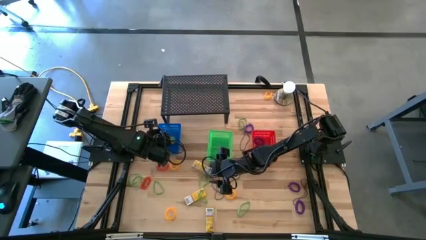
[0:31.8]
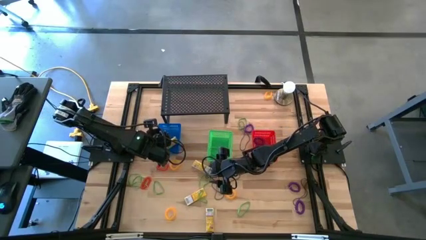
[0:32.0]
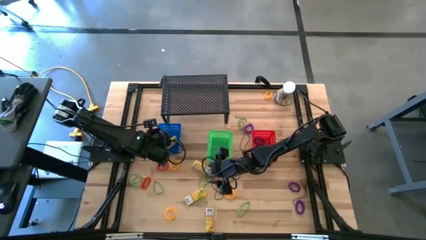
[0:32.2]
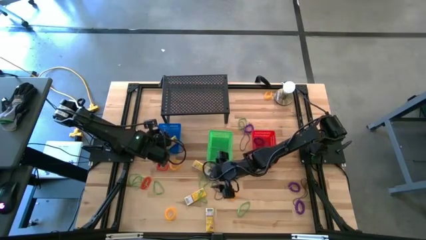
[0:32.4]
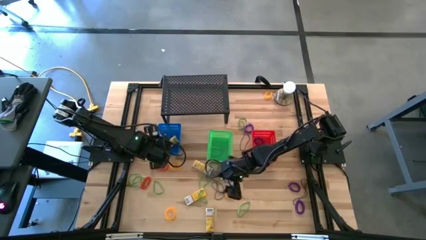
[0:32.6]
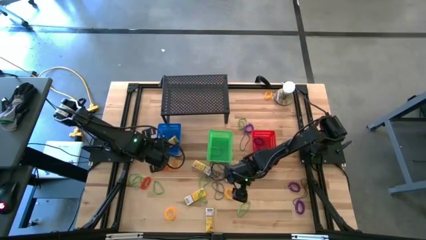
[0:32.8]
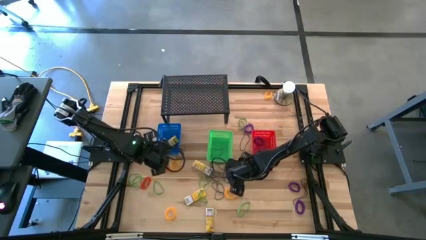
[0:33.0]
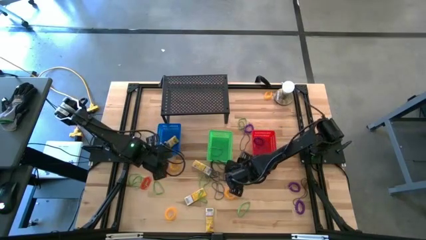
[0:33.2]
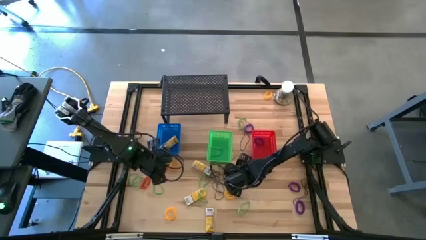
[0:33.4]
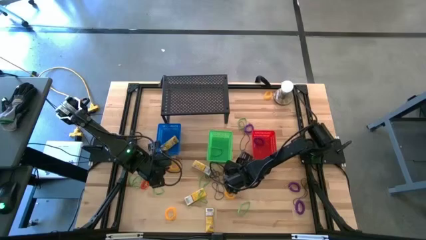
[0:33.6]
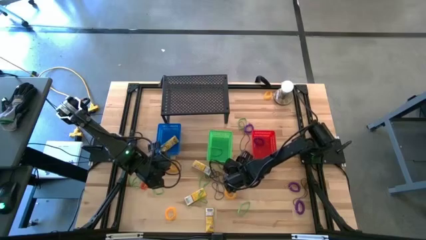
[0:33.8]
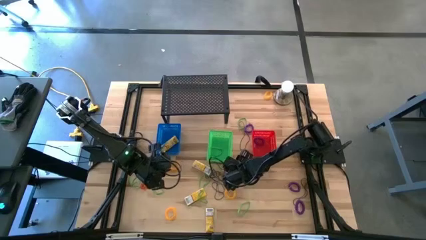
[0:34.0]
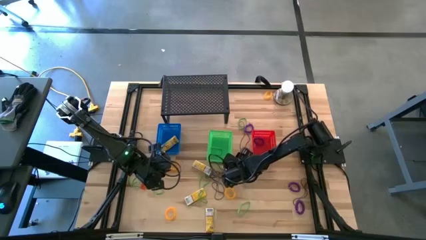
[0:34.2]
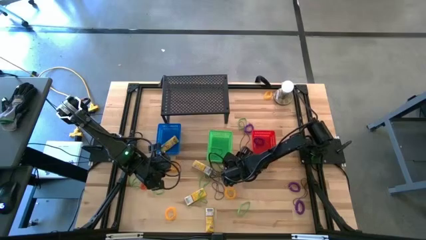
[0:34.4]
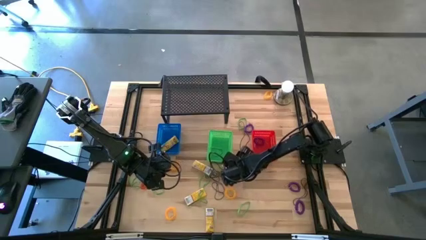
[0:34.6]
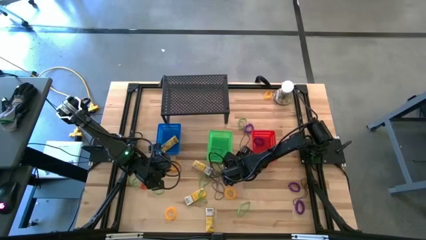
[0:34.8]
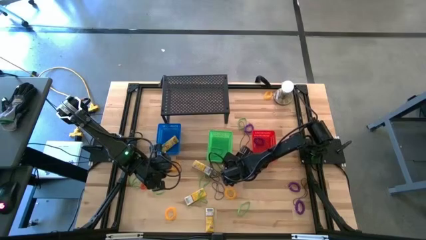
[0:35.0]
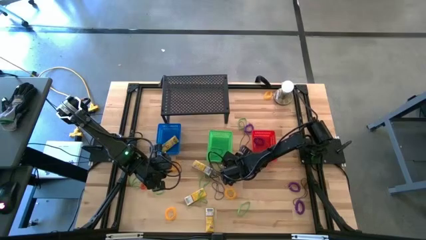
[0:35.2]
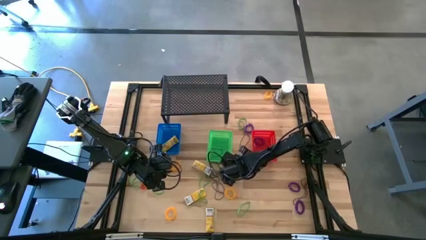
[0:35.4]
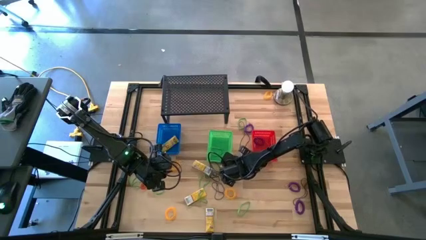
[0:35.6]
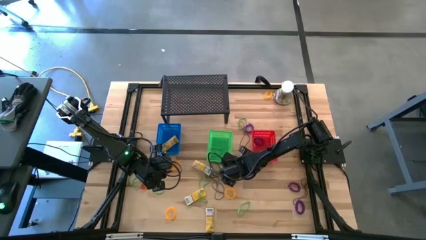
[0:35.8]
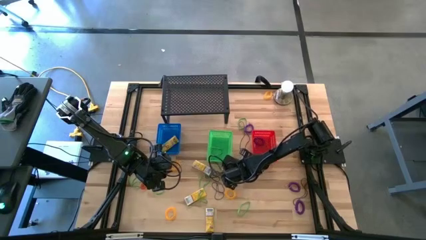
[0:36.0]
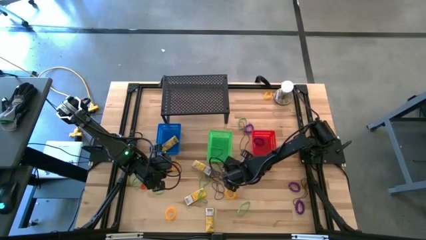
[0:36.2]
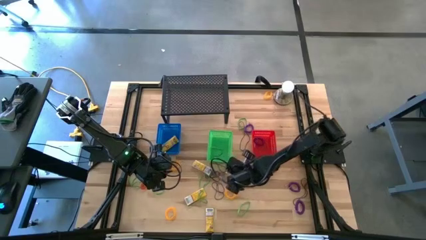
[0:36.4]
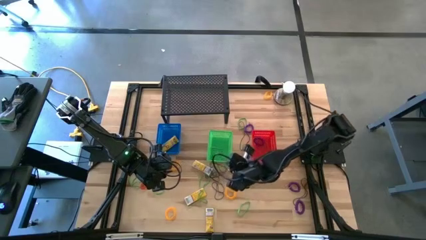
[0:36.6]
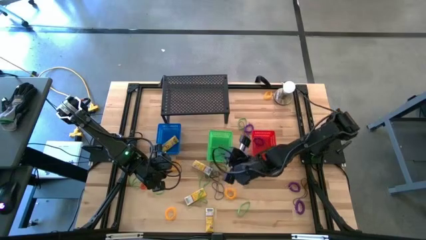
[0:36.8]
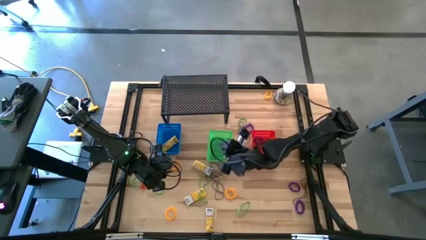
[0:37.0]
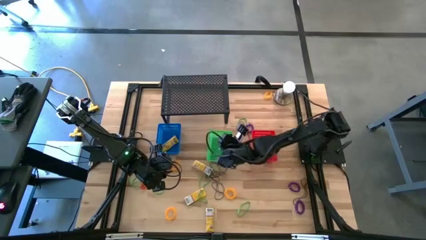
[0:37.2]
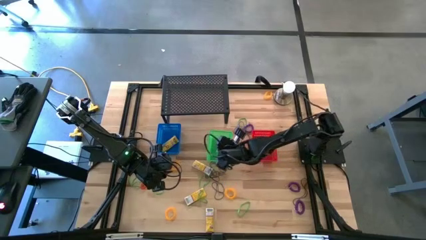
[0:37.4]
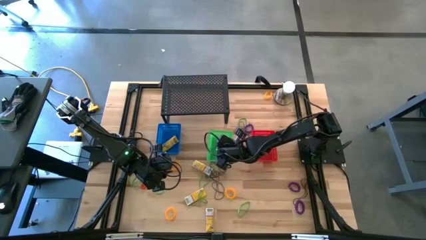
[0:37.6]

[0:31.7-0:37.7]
Task: Pick & Place Office Desk Supplies
Put the black rubber band into the green bin

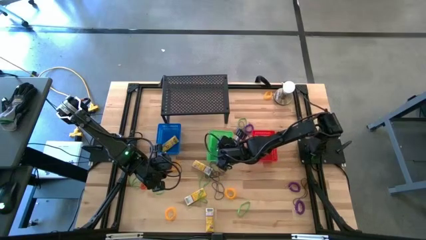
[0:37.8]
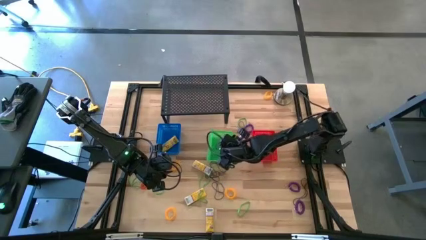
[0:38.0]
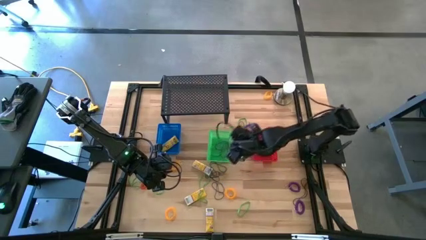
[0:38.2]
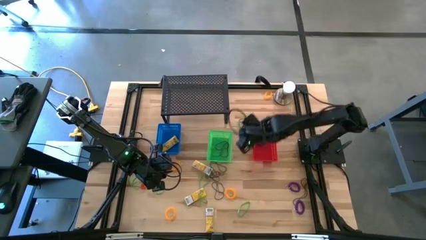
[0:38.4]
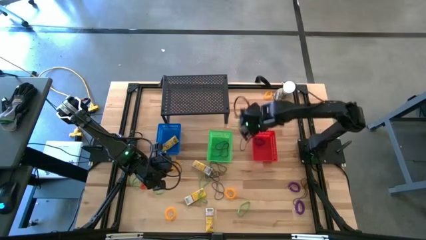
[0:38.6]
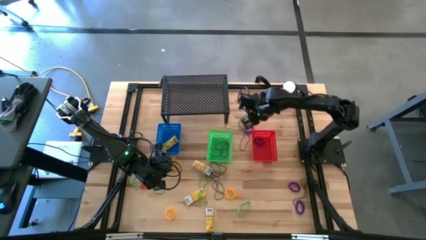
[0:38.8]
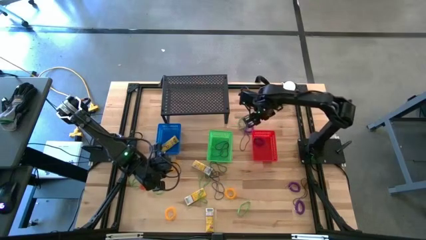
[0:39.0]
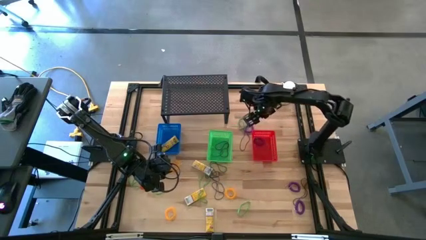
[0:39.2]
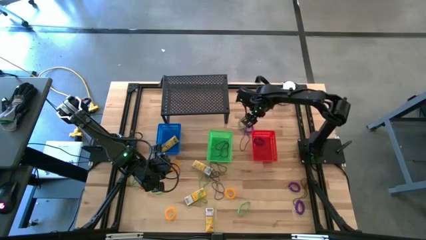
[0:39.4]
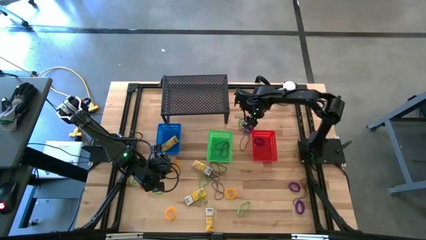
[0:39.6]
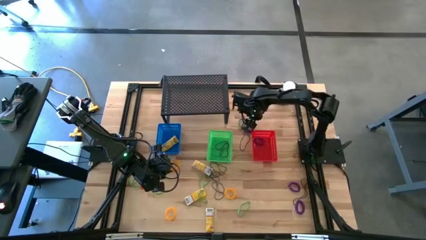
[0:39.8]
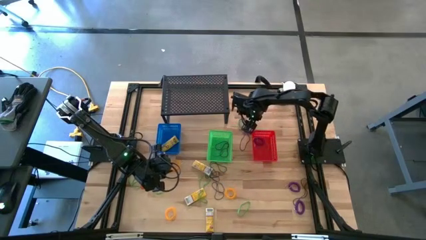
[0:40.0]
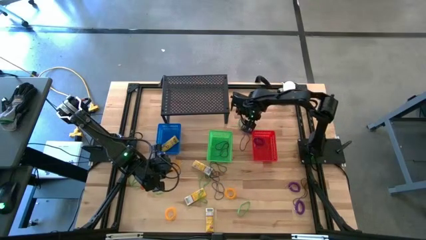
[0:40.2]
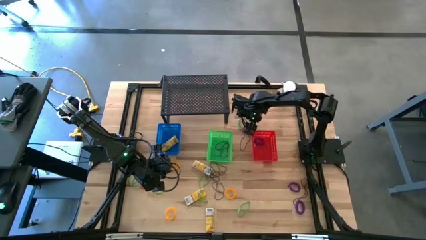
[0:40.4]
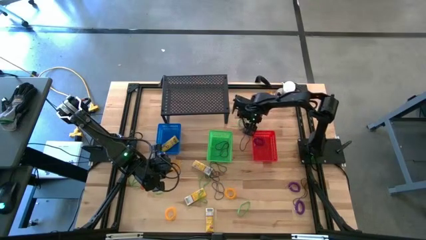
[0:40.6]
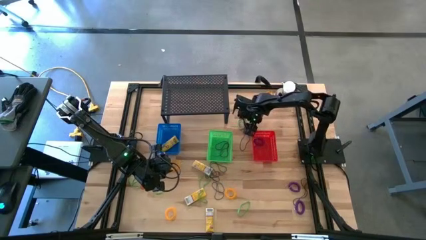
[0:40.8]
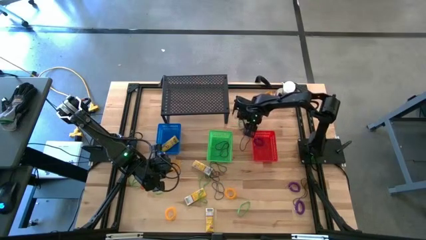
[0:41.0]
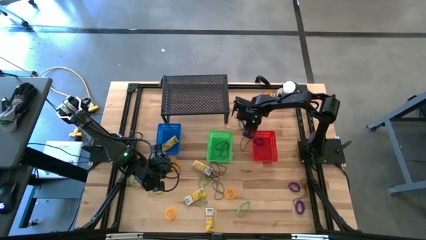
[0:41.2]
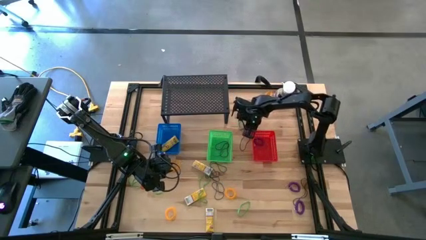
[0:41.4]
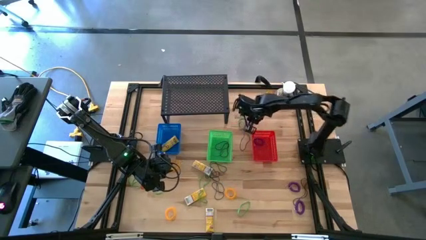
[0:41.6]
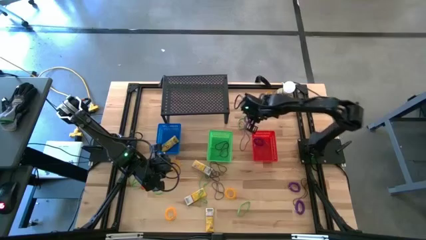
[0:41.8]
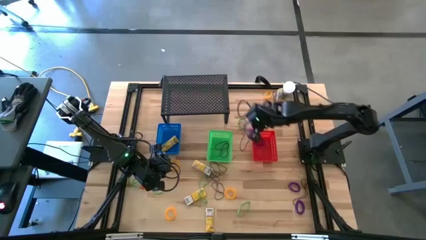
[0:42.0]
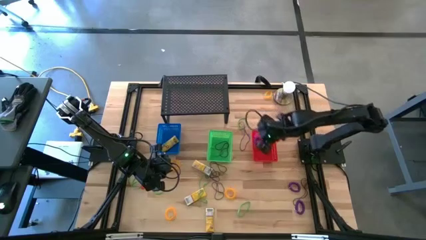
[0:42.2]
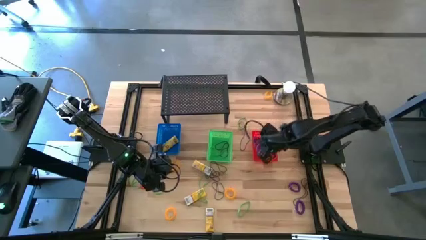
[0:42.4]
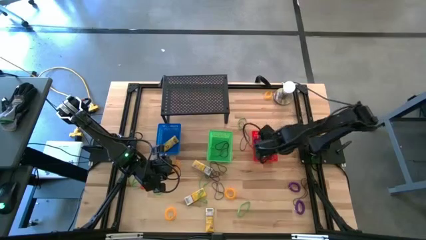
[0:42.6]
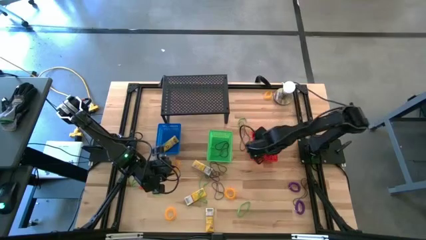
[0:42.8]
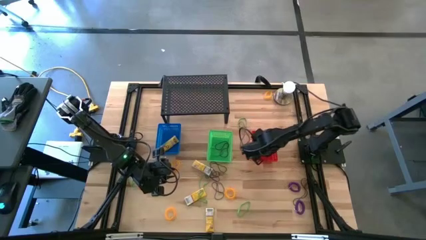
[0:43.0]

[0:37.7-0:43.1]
Put the violet spring keychain into the red bin

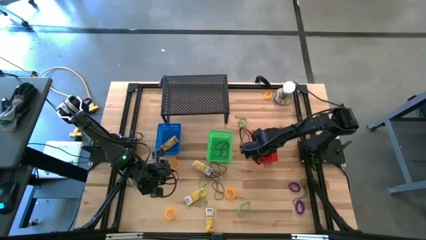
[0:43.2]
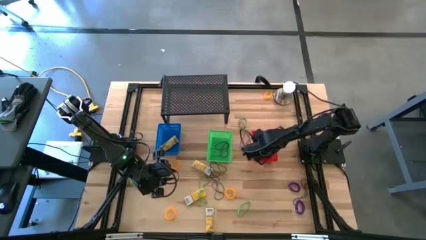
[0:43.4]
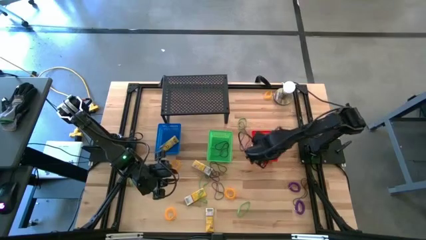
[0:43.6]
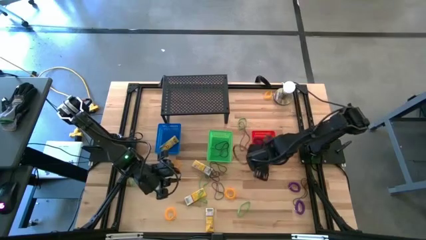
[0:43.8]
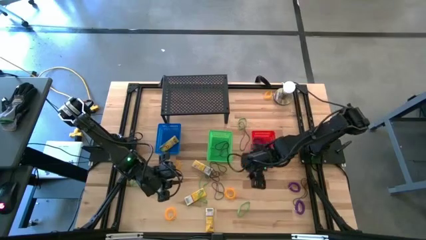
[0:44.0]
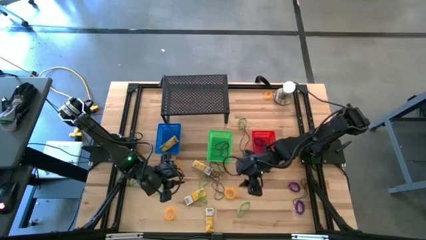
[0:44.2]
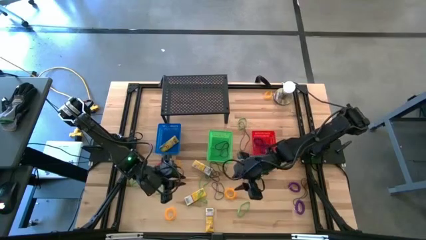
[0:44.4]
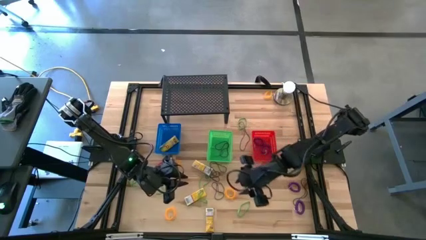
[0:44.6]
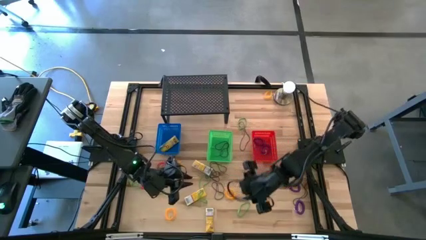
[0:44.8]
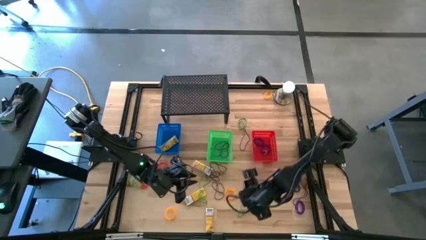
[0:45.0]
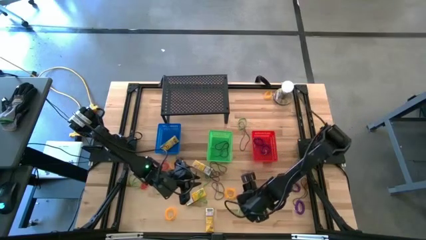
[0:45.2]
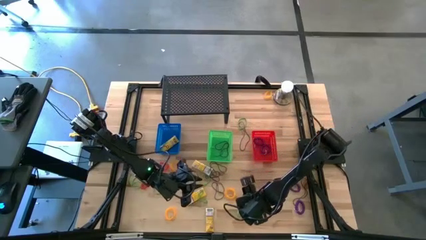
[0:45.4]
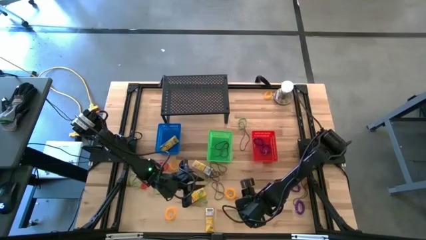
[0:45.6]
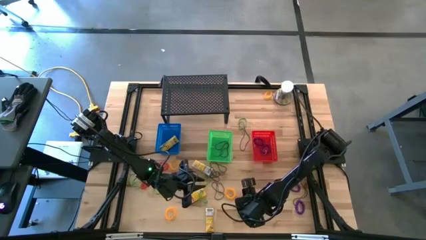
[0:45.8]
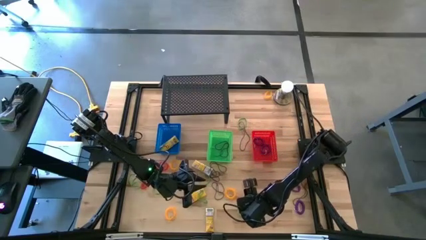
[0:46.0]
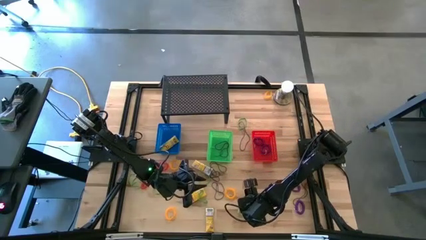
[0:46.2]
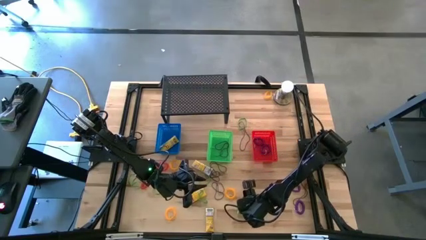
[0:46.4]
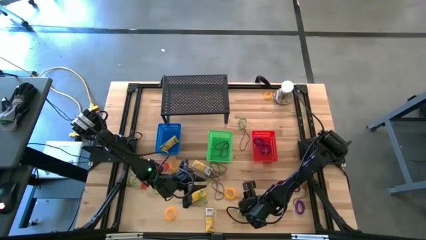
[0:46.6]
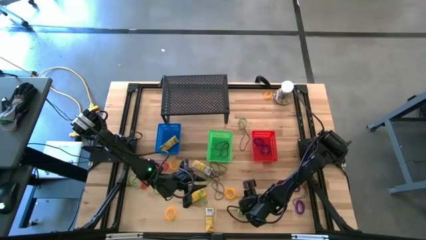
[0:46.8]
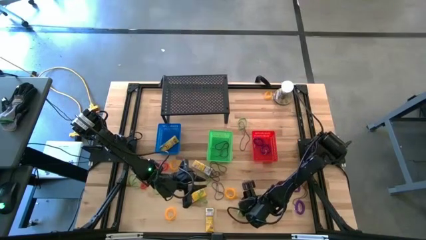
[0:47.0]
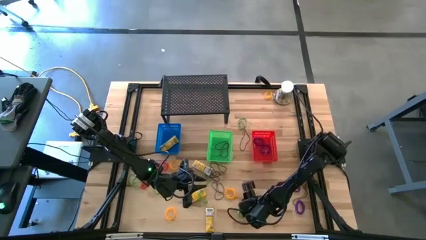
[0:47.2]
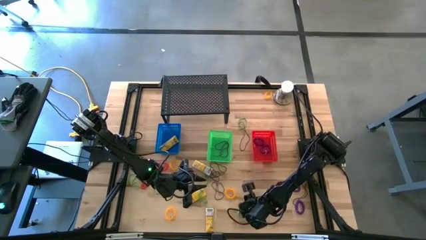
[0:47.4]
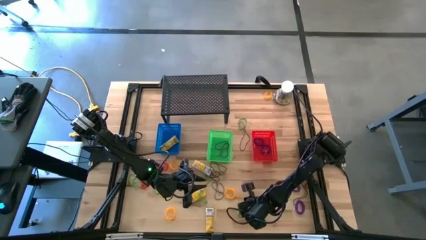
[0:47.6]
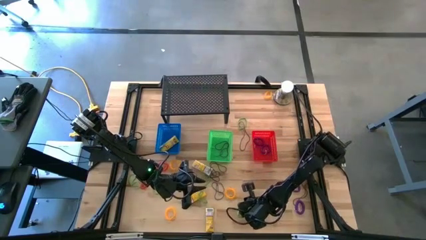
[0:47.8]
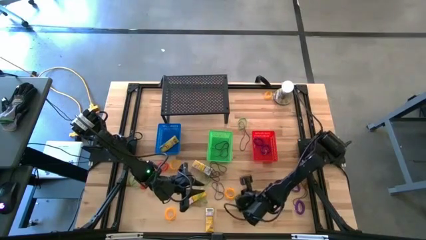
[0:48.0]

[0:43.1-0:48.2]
Put the green rubber band into the green bin

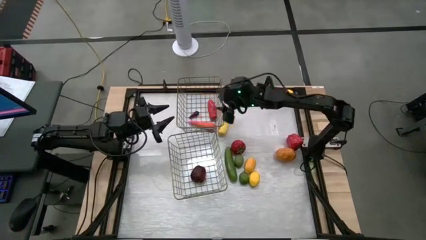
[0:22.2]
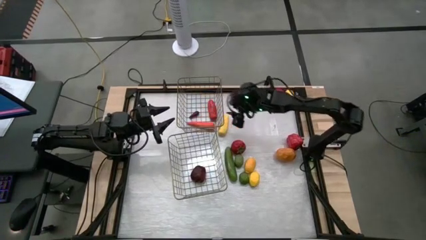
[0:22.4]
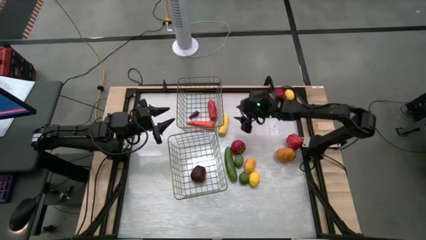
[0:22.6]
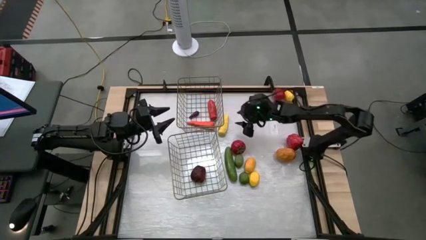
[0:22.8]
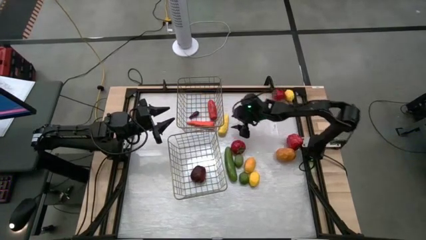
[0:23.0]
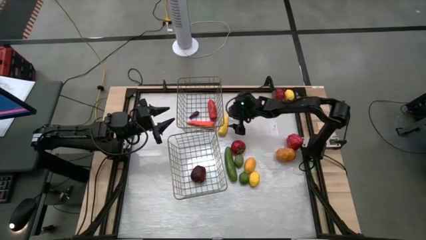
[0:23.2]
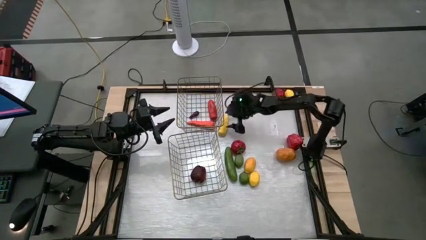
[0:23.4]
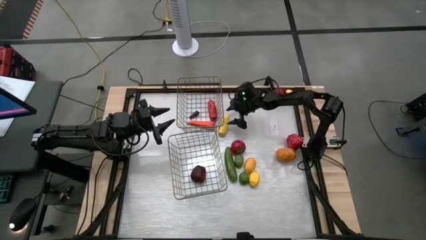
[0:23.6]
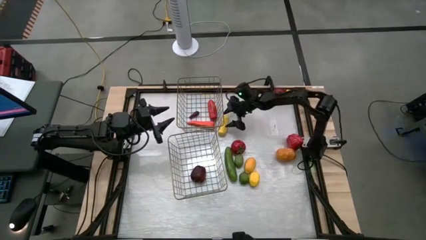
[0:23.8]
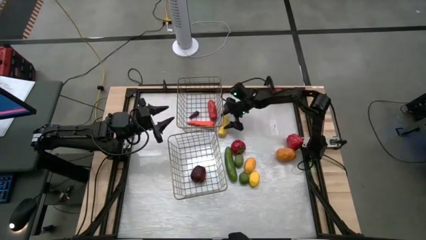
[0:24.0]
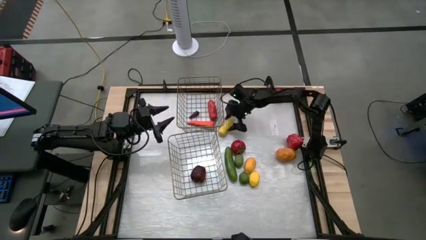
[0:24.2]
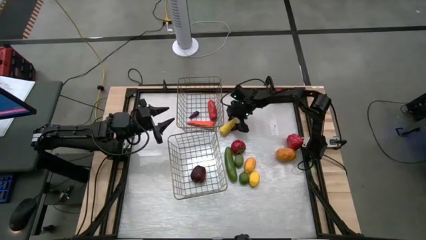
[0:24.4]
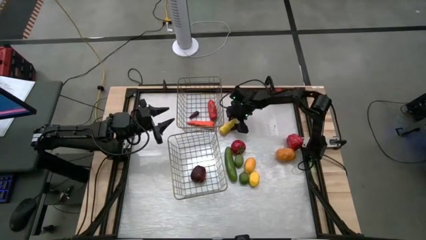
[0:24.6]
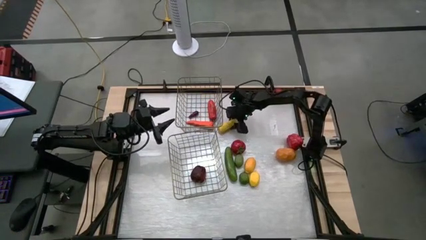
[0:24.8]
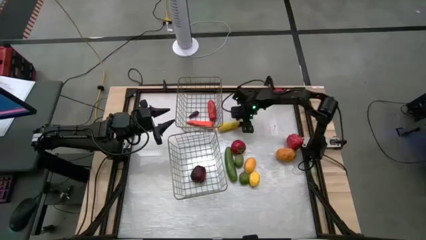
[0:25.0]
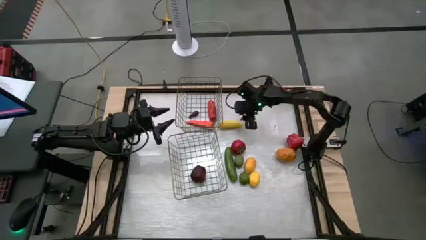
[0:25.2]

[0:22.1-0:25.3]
Task: Sort produce into baskets
Put the yellow corn into the top basket
